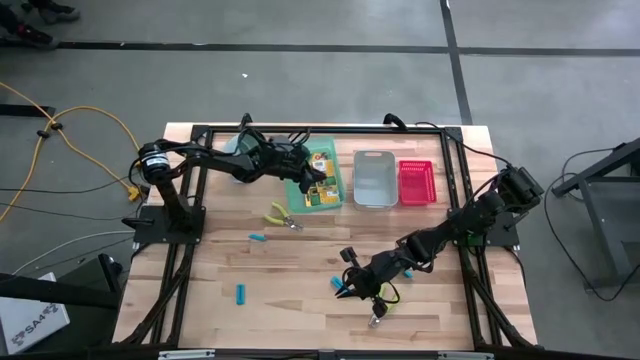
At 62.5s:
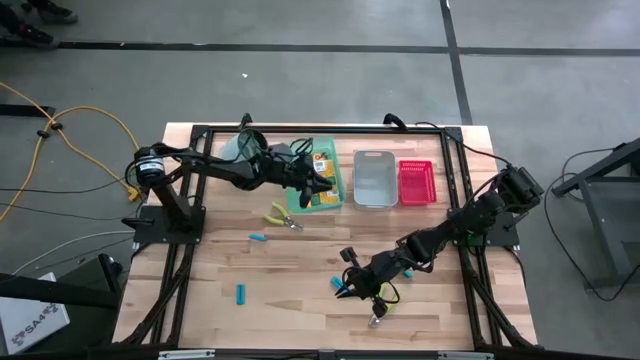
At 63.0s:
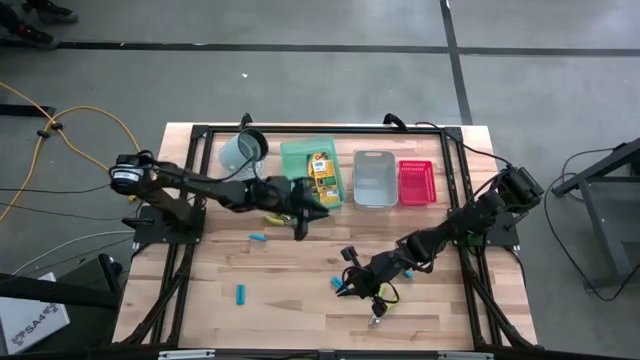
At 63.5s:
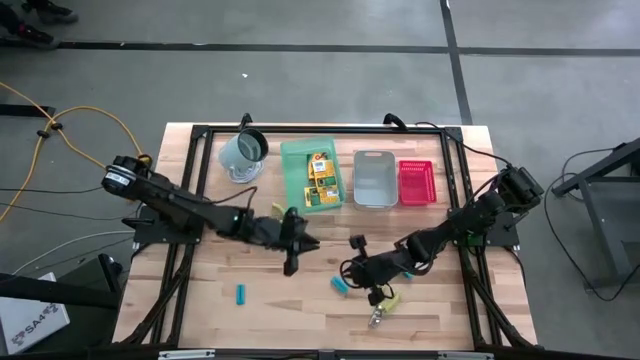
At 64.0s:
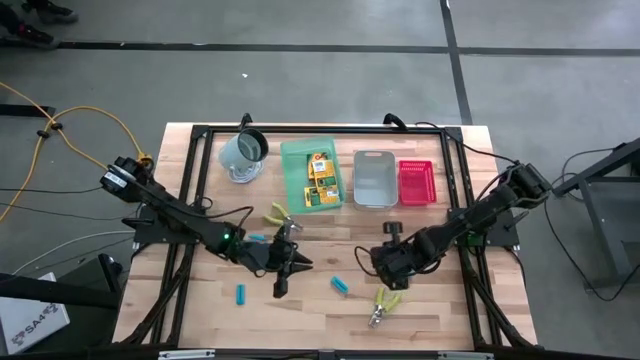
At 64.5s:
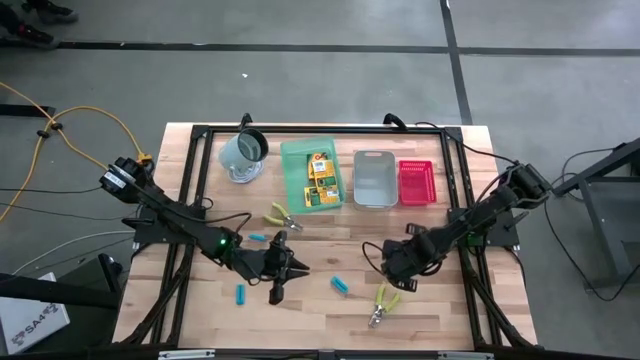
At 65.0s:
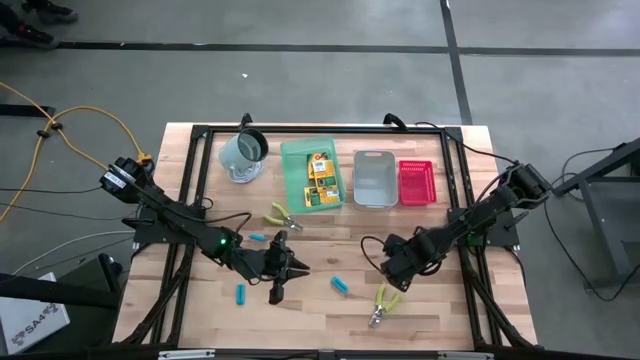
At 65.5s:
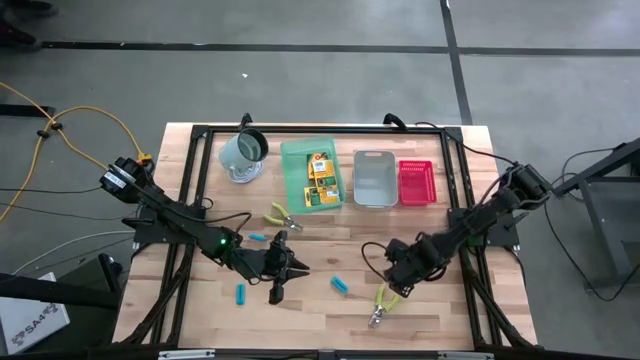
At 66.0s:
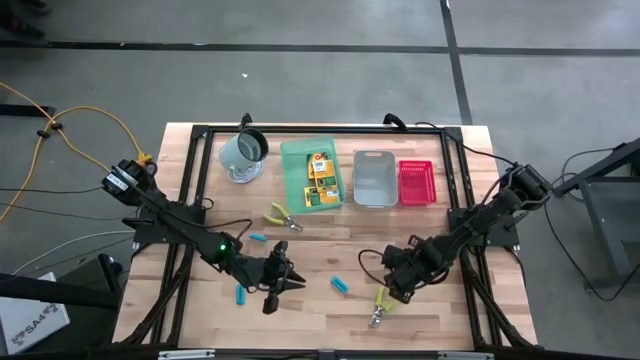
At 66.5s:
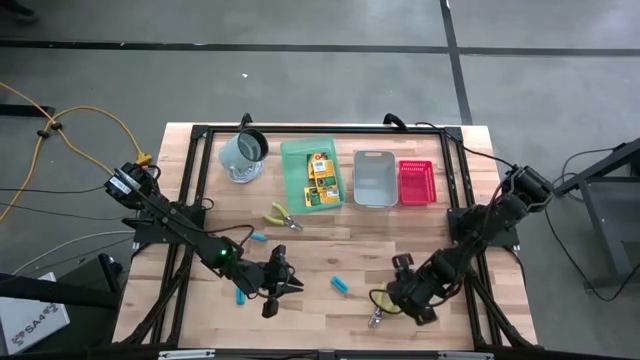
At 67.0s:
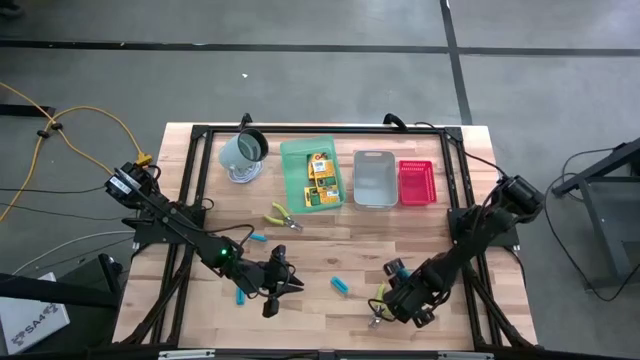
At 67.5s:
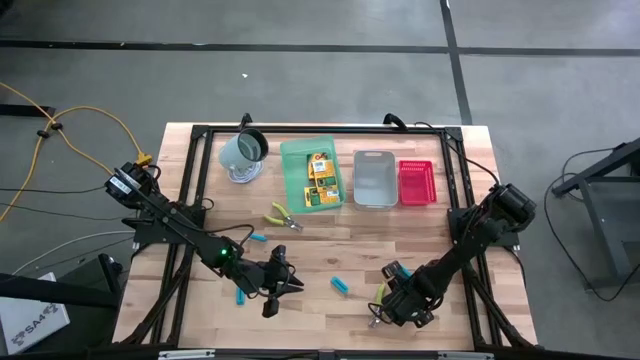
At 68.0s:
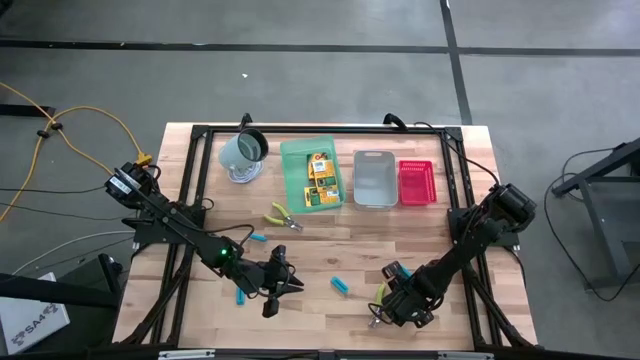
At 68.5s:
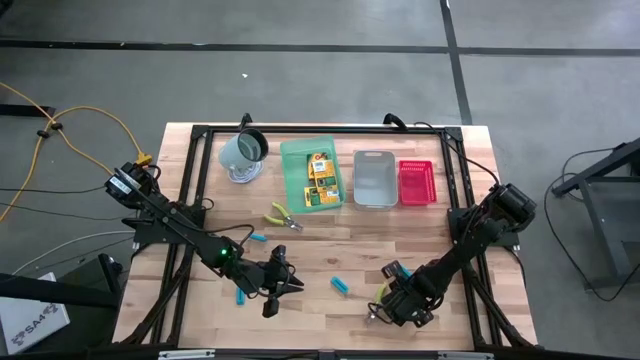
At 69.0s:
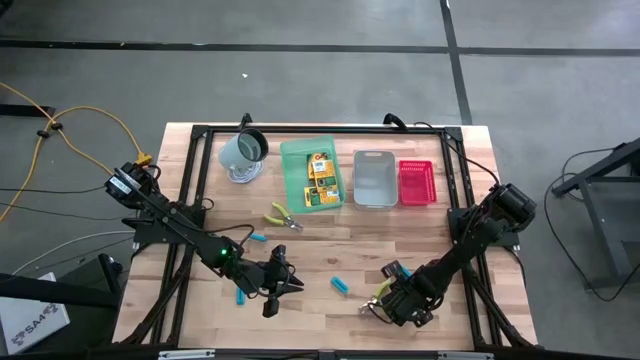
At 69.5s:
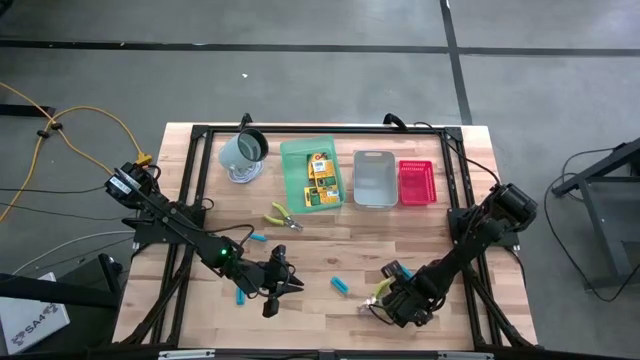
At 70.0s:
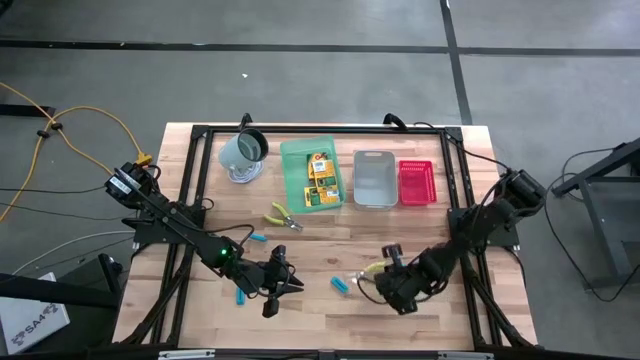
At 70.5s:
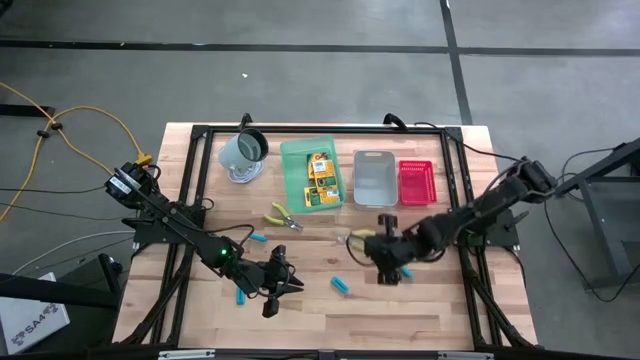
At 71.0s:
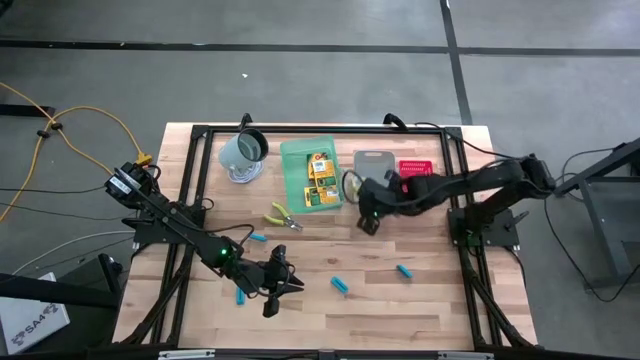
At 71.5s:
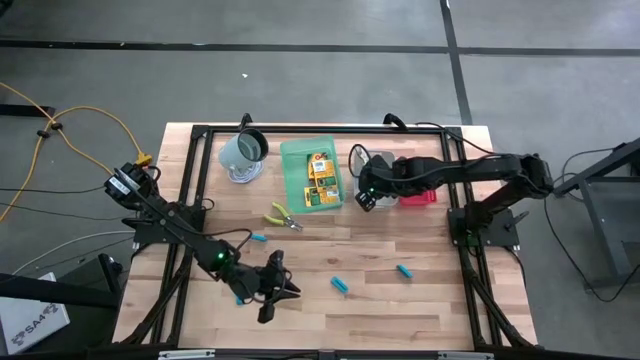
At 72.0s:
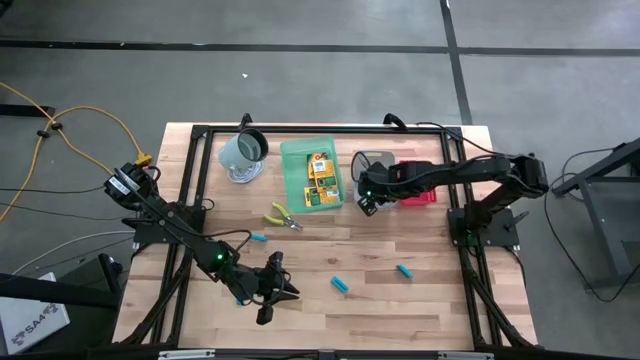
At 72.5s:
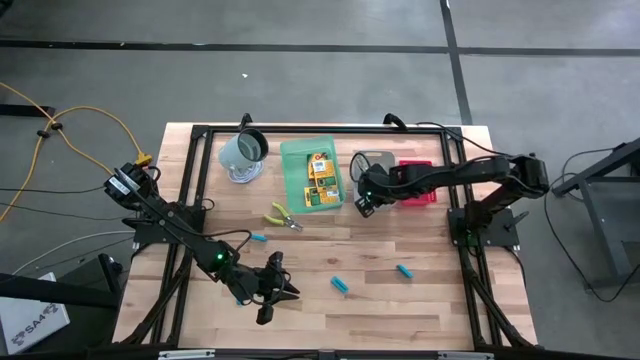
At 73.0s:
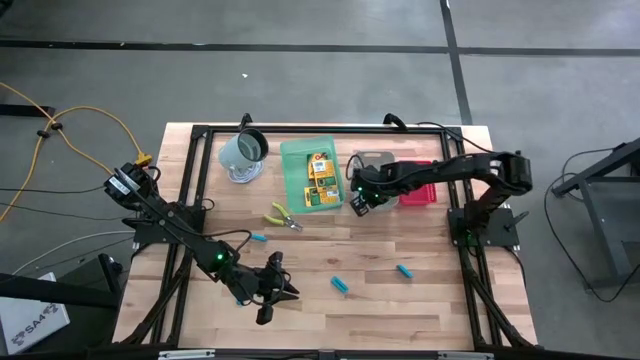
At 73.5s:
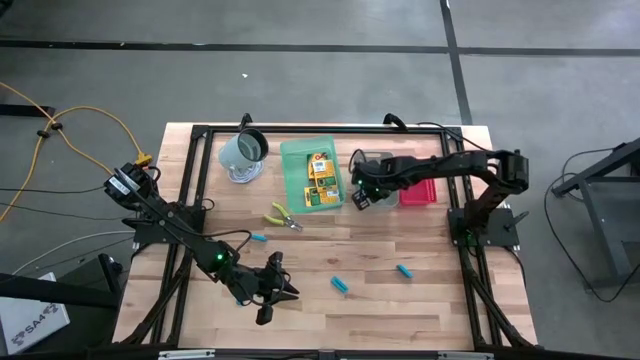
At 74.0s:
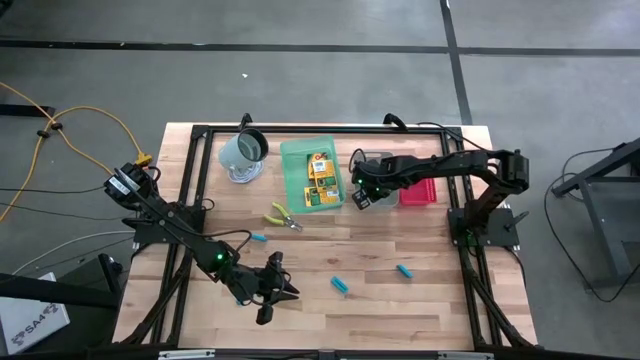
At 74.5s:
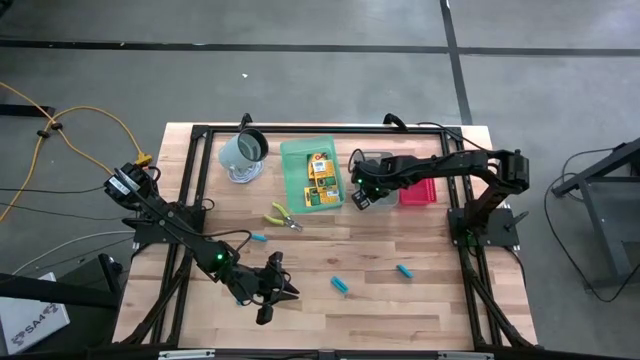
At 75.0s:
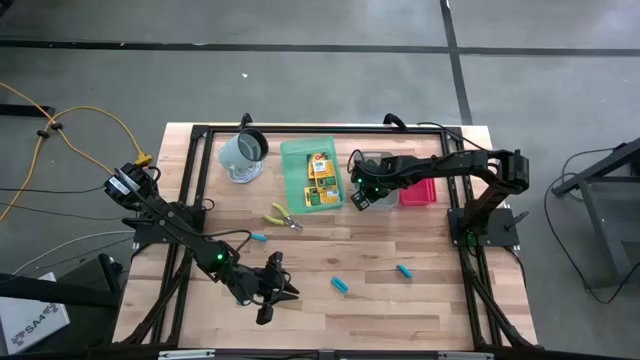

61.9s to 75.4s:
Task: Pick & Place School Supplies
Put the right green puncher into the gray bin

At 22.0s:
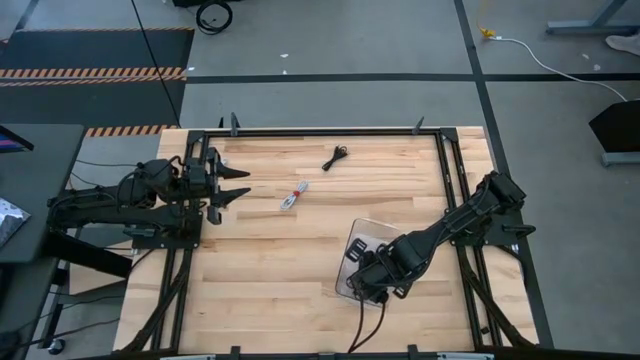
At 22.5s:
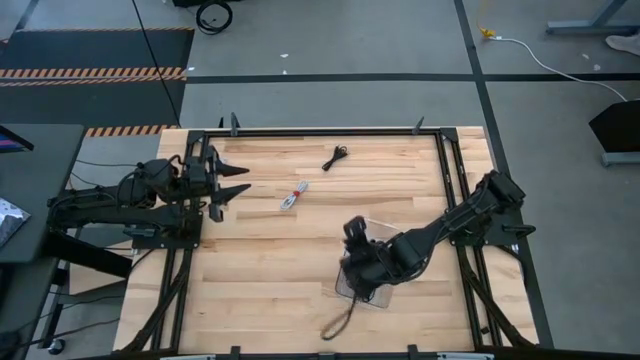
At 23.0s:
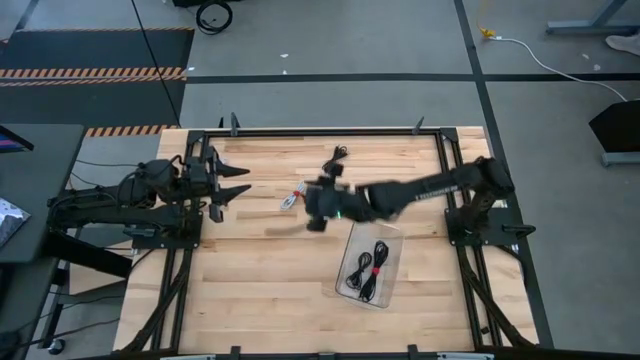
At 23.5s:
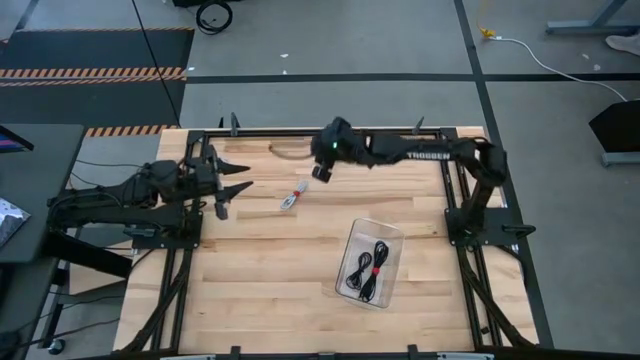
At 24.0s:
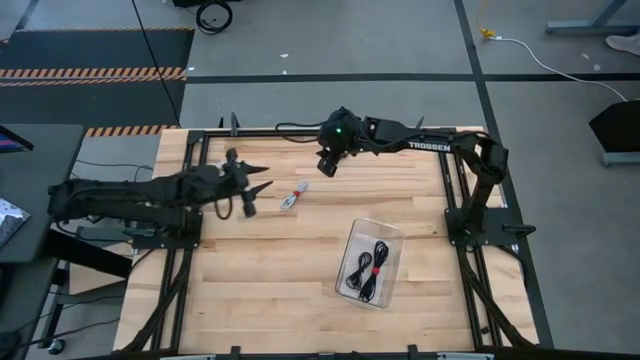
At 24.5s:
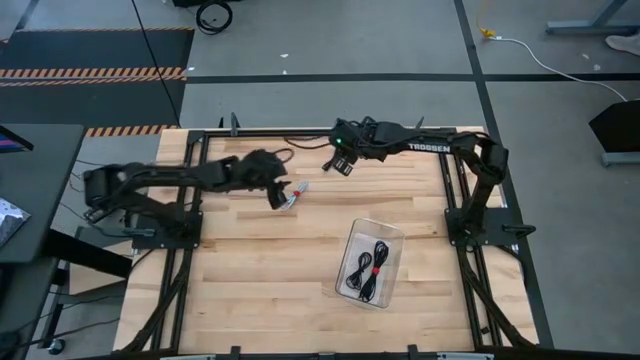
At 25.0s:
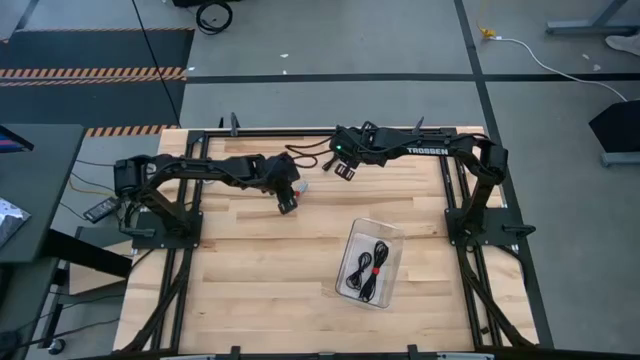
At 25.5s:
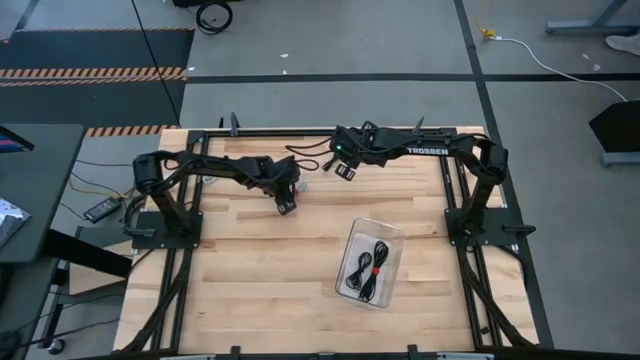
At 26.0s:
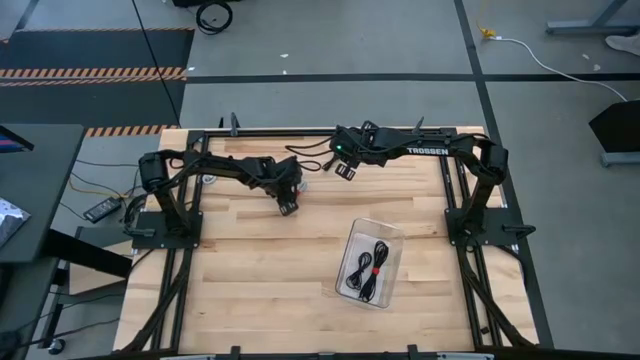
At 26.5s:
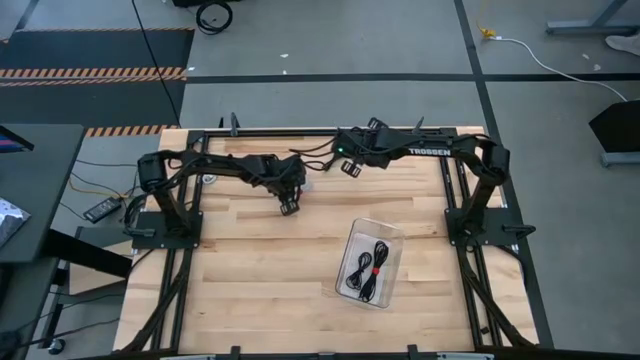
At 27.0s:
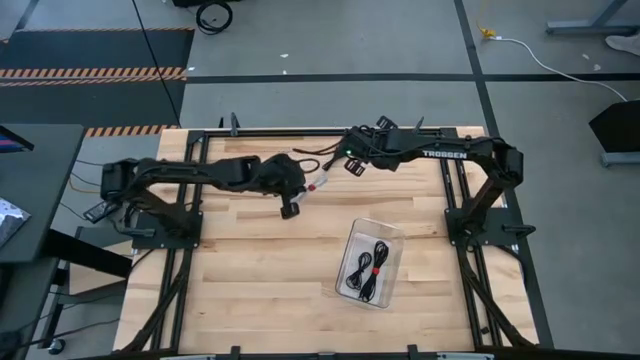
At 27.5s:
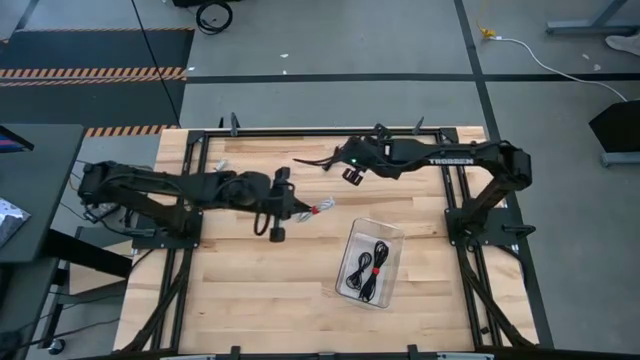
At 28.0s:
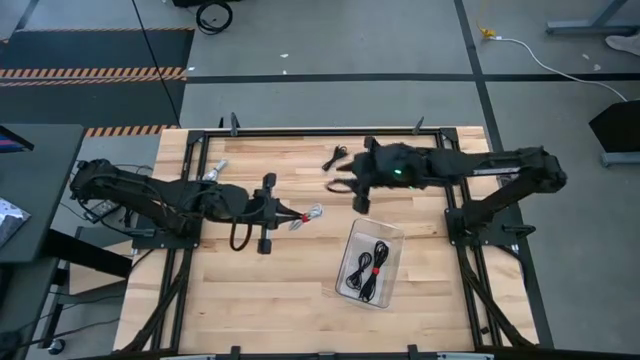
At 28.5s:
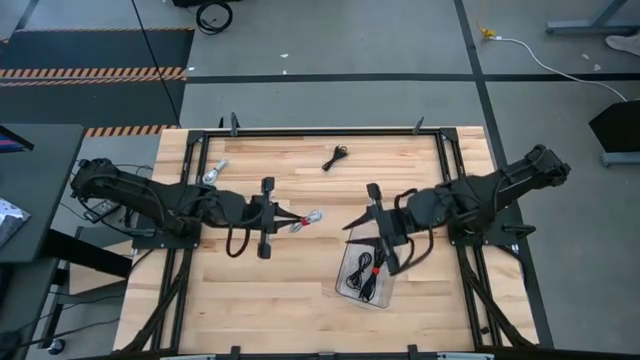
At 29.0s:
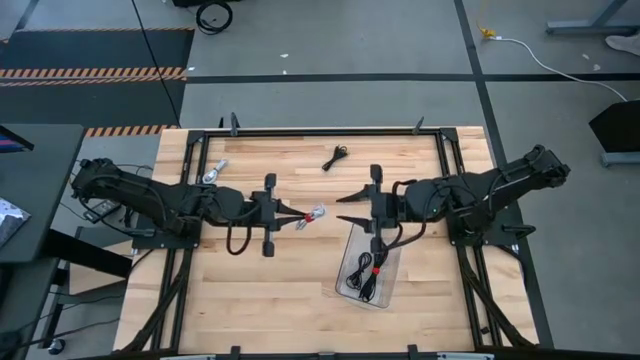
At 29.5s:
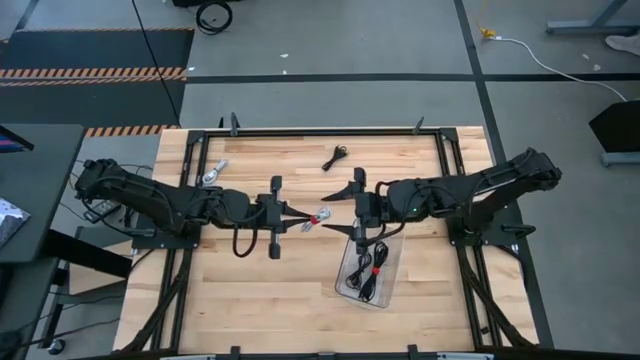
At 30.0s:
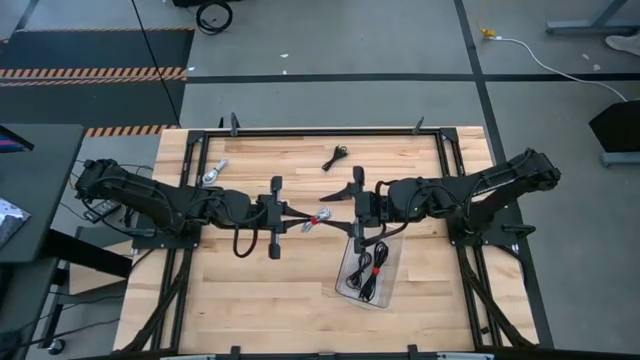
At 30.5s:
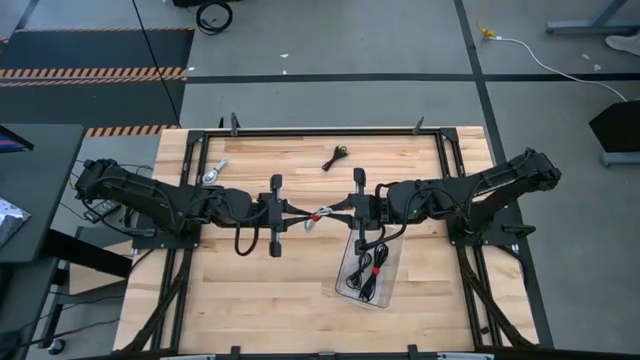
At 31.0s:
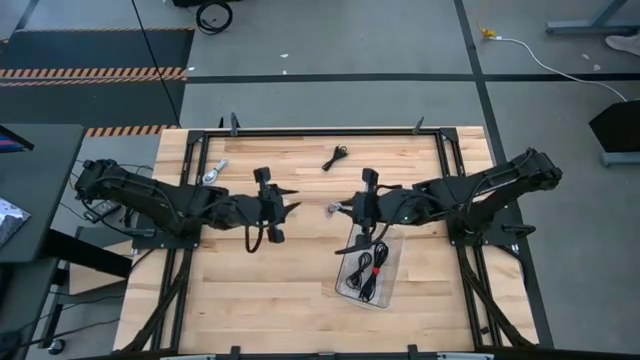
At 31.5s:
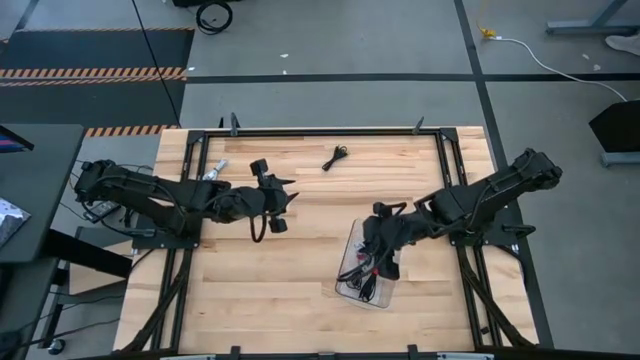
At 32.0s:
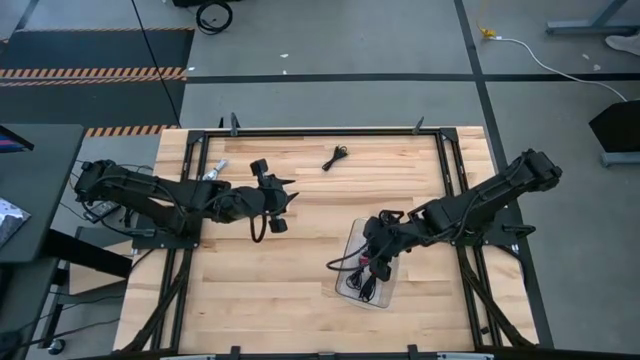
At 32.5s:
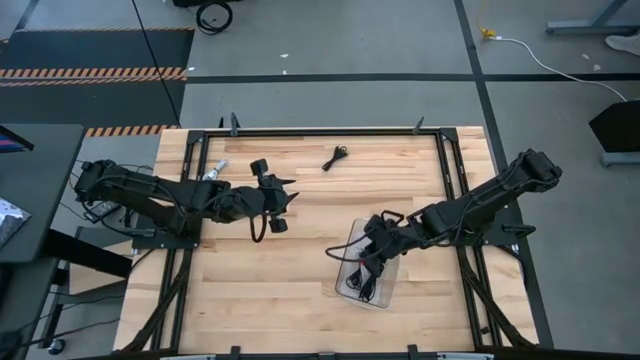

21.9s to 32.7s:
Task: Pick and place USB-C Cables
Put the right white USB charger cable into the transparent bin
